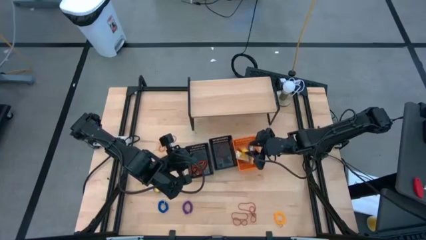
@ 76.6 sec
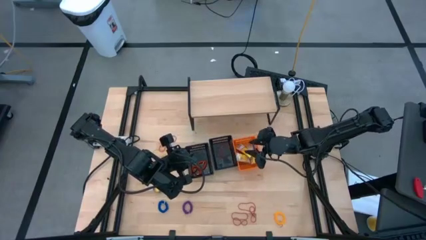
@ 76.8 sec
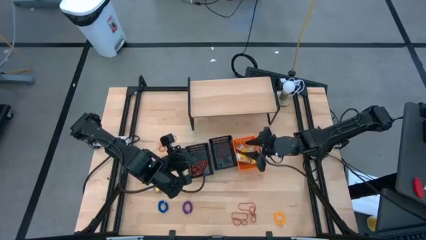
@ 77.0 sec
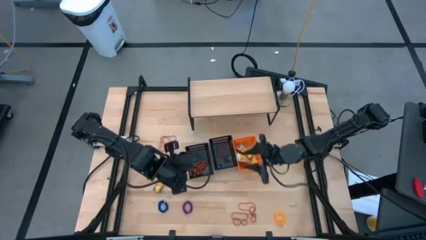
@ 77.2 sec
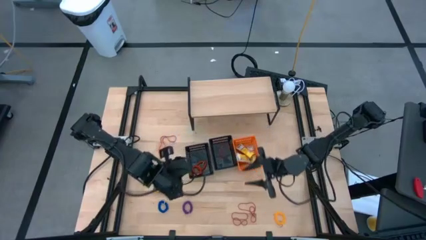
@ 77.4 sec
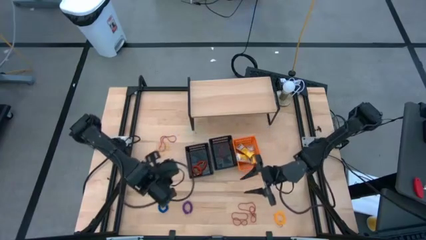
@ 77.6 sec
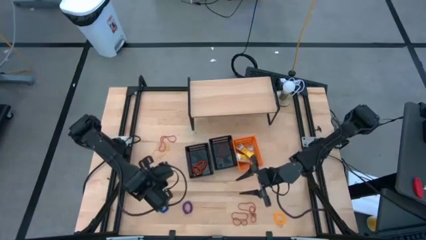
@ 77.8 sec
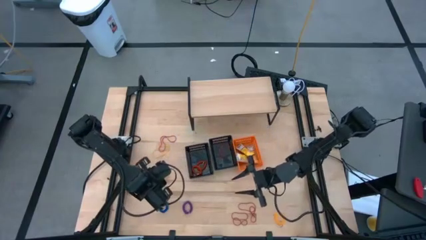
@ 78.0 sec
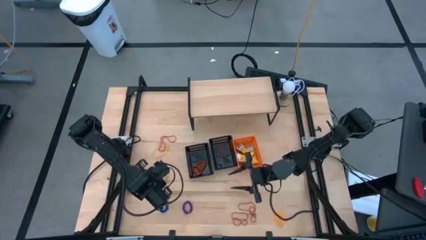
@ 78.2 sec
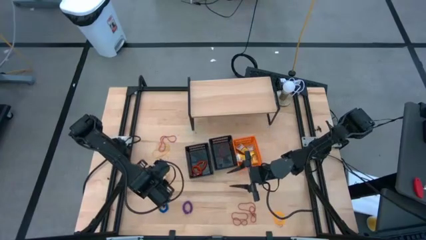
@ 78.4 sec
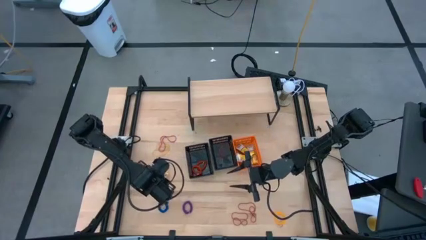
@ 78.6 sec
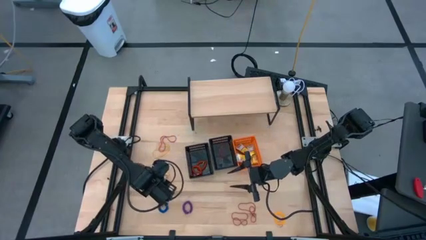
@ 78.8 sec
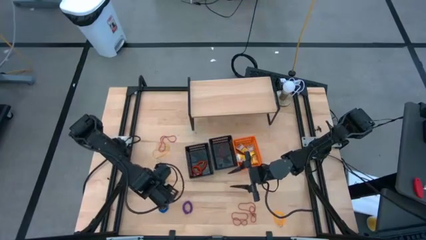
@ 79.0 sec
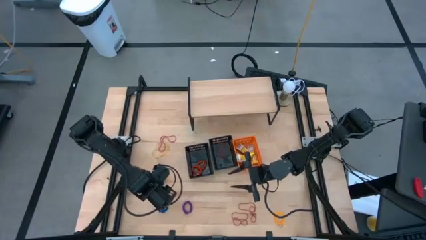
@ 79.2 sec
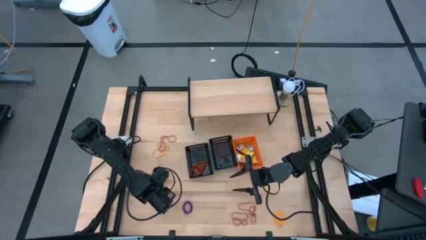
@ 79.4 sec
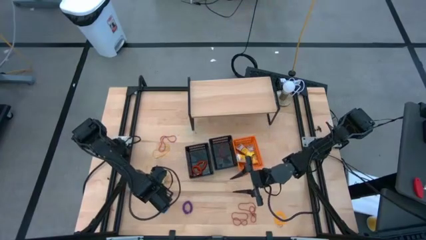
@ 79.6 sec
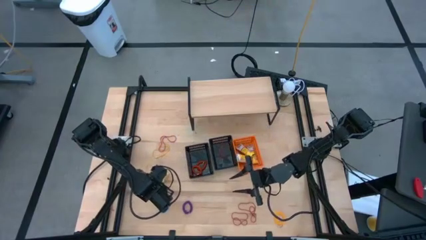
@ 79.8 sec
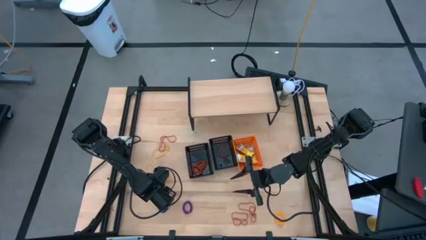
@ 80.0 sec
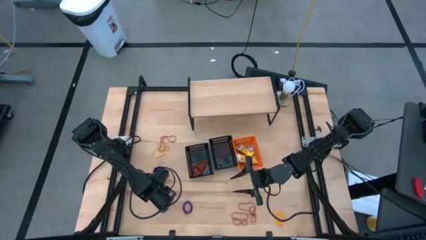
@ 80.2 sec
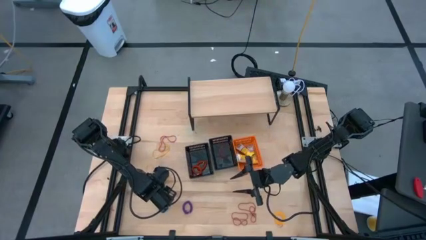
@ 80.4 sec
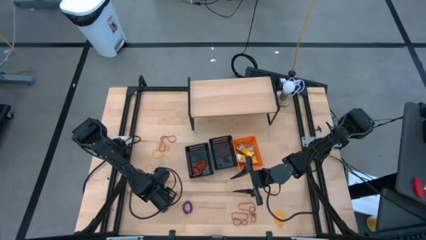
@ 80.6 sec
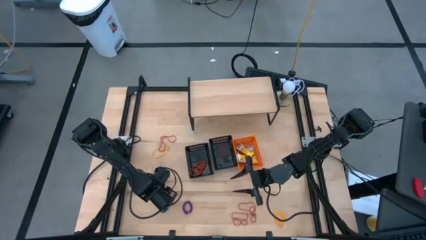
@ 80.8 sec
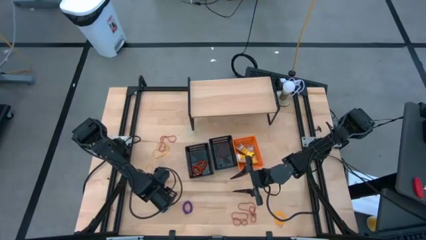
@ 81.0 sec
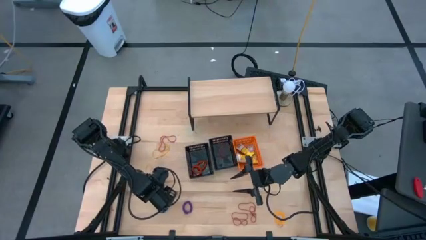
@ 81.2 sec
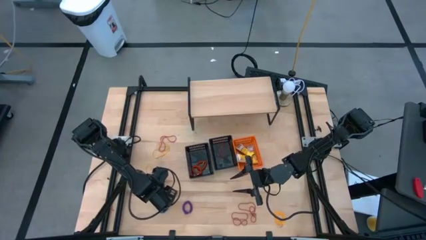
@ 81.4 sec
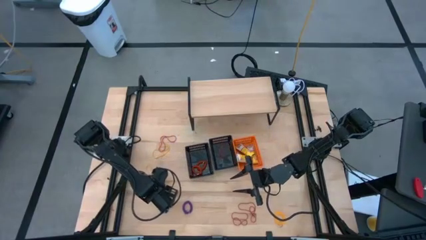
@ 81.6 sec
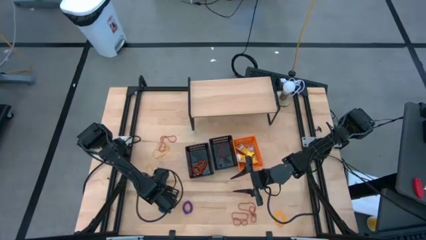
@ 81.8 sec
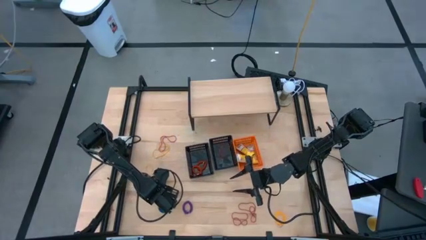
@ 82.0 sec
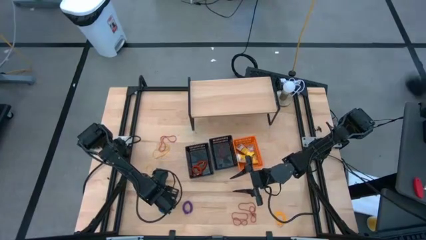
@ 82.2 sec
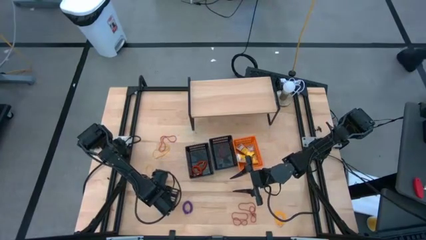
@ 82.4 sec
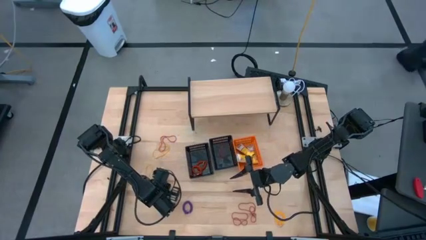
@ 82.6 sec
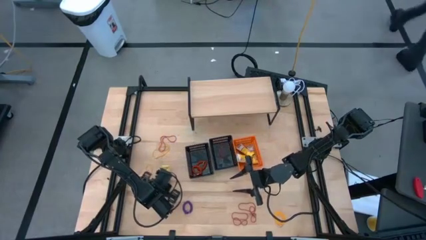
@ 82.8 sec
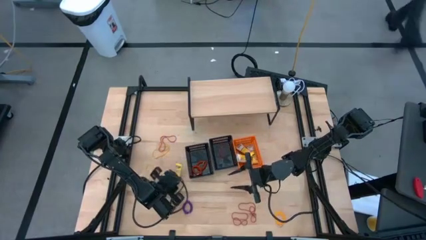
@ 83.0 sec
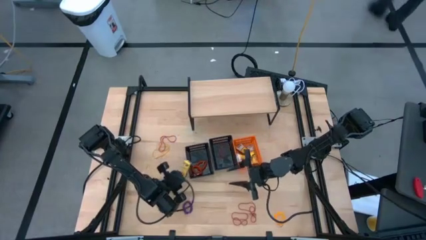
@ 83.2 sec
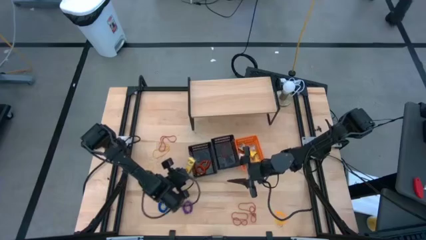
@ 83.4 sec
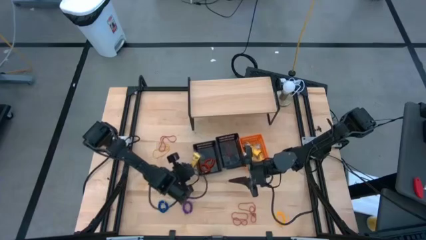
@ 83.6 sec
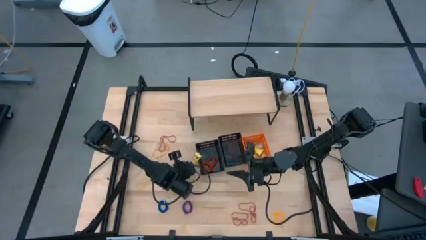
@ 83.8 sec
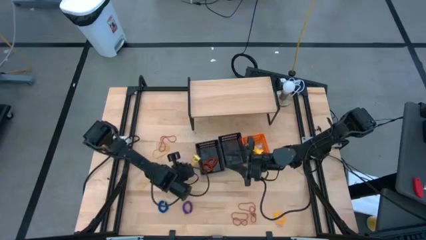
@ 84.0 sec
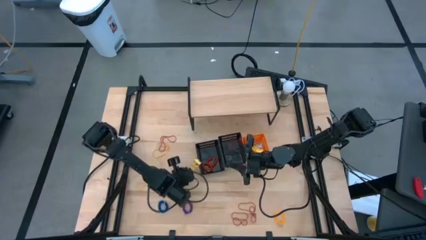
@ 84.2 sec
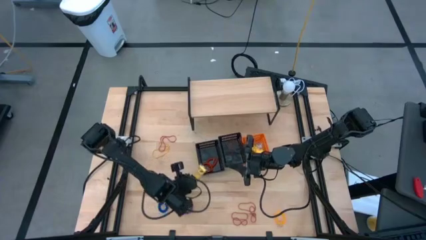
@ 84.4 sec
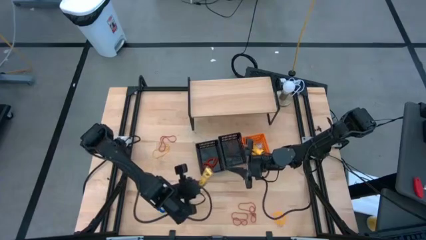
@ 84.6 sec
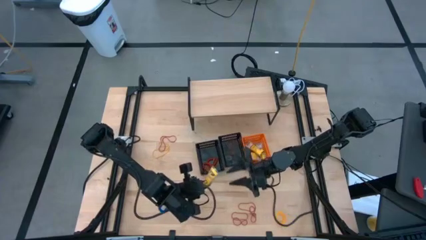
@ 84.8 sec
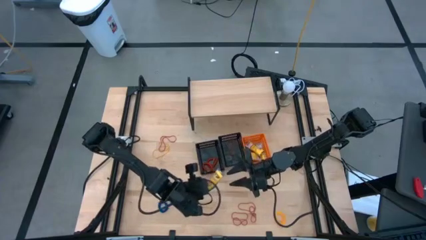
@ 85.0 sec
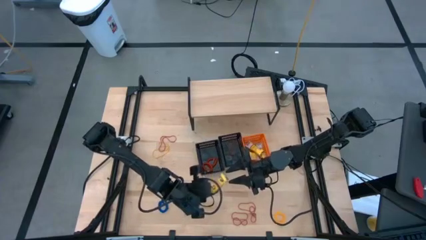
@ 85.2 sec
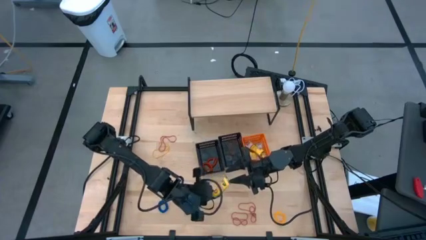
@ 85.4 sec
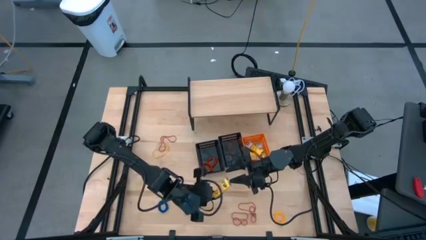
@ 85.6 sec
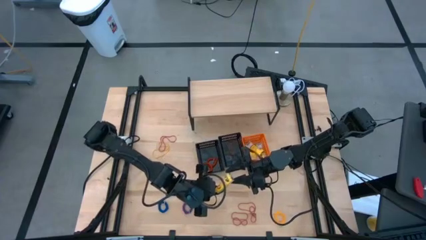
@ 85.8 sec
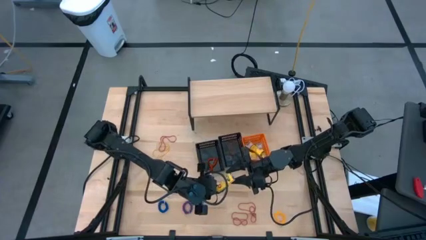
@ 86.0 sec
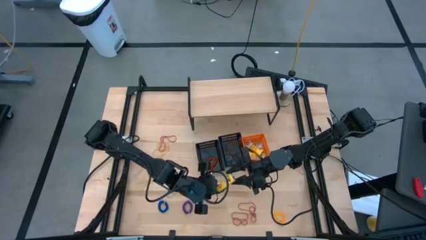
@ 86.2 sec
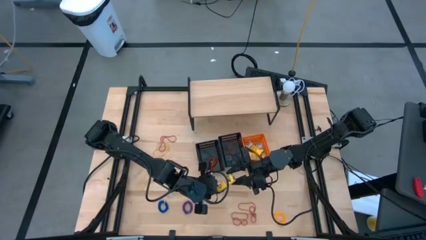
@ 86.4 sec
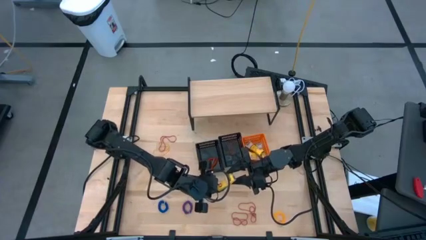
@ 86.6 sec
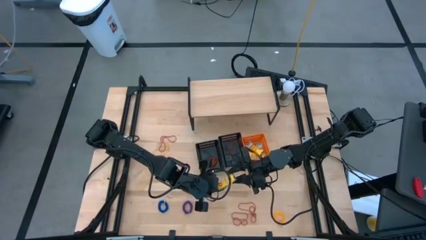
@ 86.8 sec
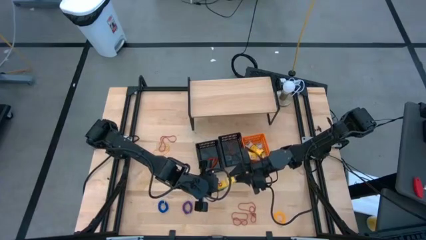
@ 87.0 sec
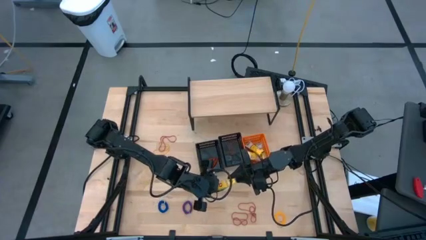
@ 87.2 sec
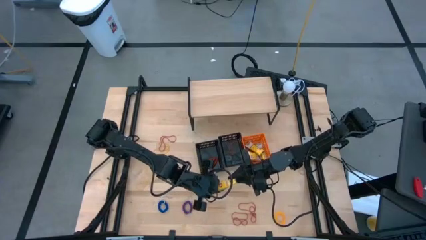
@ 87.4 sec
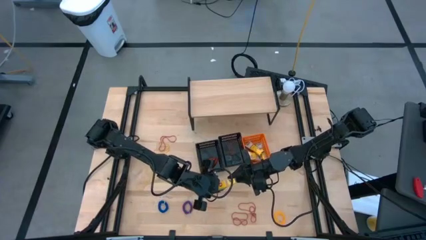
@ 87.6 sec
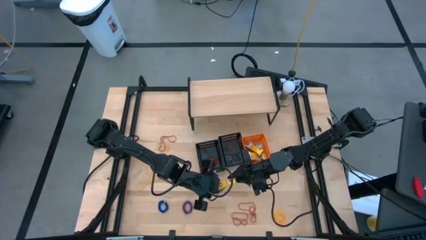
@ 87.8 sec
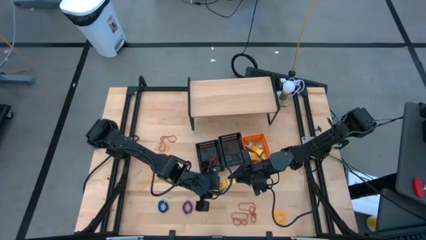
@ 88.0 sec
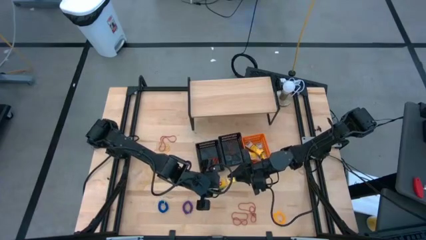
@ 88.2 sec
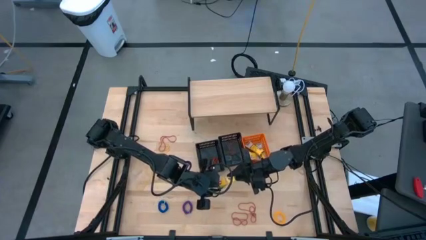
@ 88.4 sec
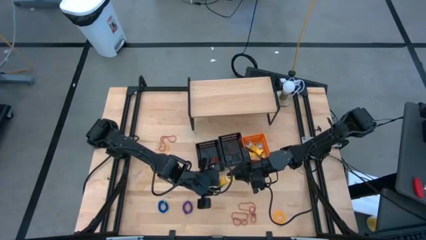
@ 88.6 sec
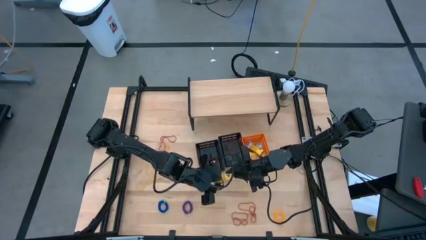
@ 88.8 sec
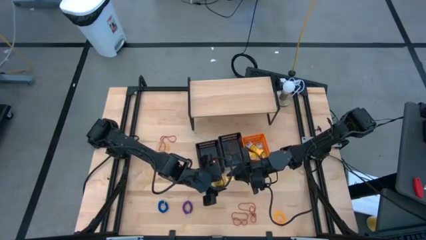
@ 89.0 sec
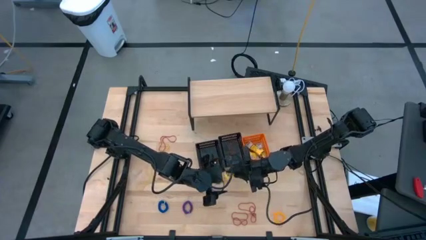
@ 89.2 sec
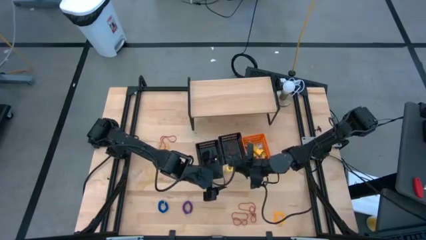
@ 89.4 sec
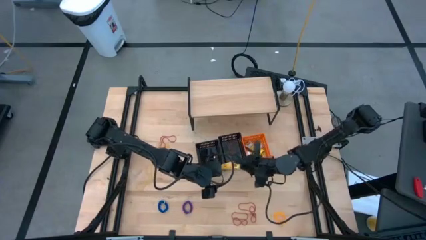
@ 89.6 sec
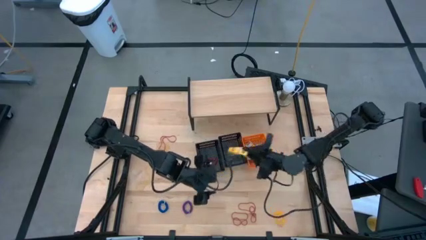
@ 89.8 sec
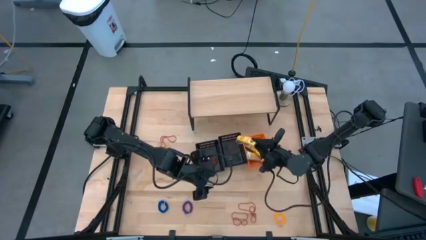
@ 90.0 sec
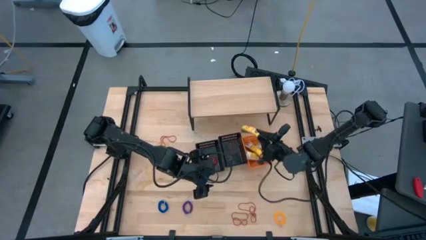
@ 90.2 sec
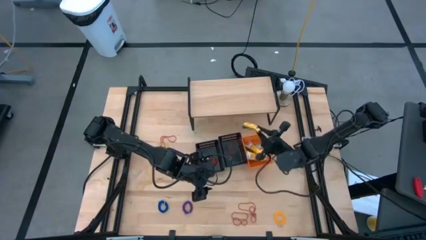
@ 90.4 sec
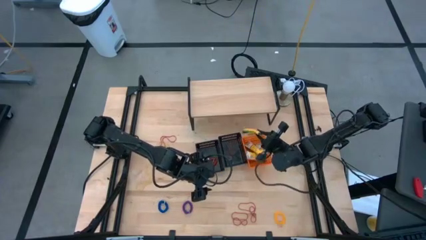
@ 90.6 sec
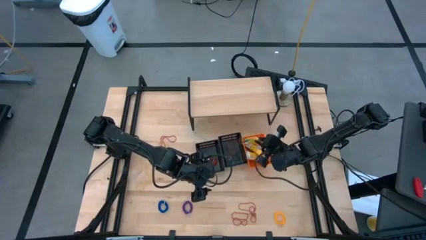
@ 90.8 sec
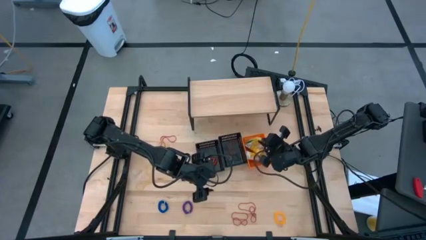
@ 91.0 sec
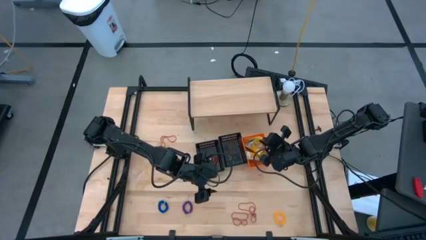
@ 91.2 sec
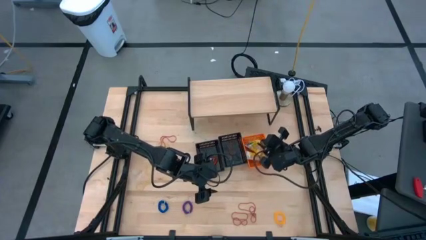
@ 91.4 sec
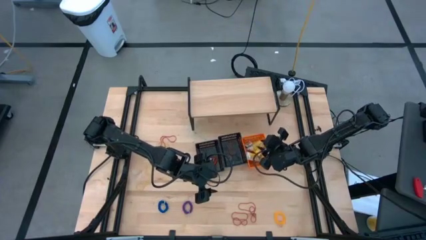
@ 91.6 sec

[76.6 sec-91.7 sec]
Task: Pick & Place Office Desk Supplies
Put the yellow crayon bag into the orange bin

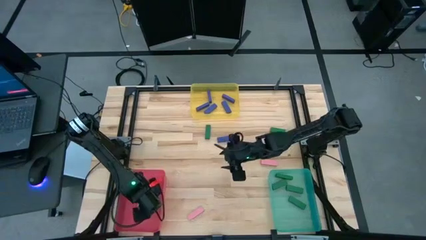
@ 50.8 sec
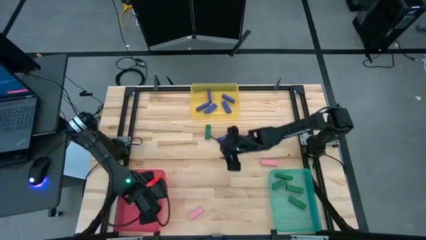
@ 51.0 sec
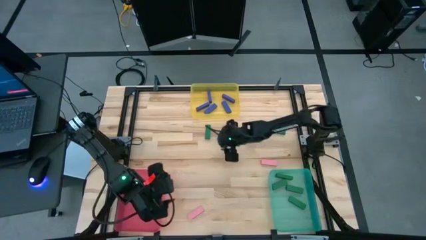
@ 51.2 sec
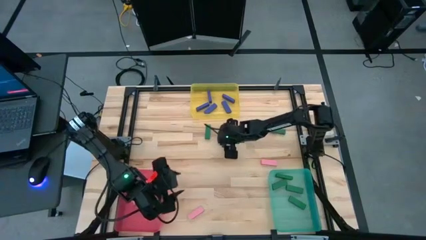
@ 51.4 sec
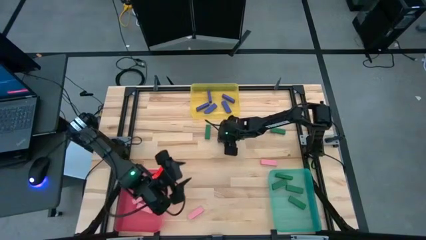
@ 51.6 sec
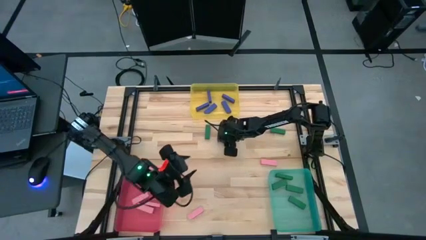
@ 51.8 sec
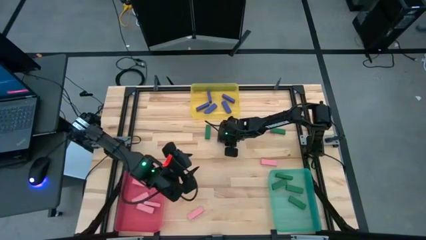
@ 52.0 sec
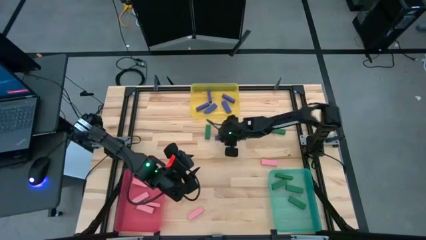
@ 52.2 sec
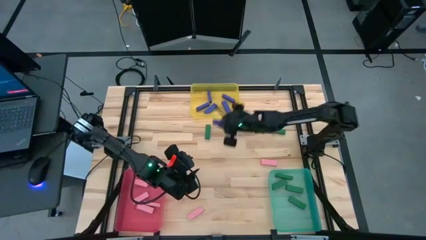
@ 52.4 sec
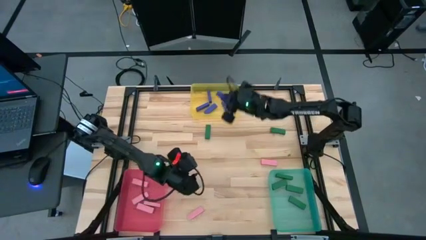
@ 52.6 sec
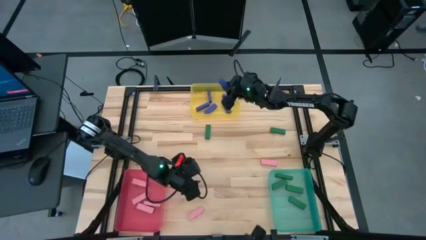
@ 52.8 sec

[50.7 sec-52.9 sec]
Task: Sort blocks
Put the blue block into the yellow bin
